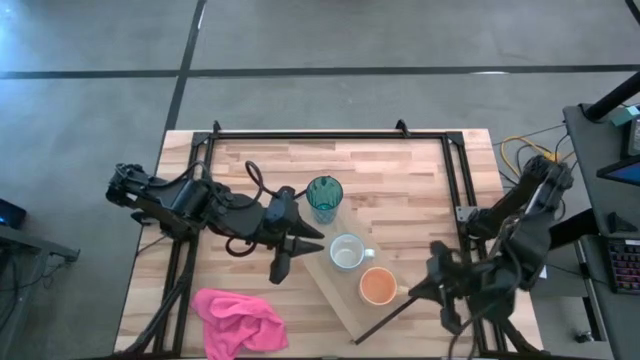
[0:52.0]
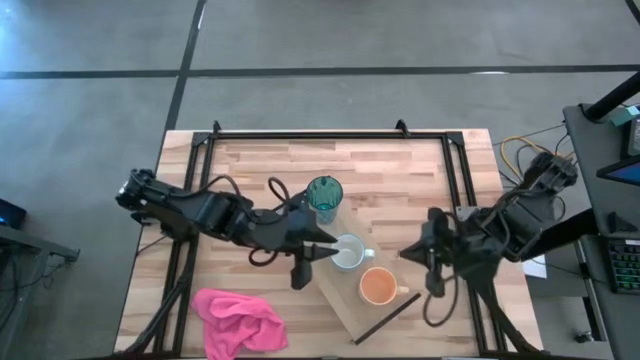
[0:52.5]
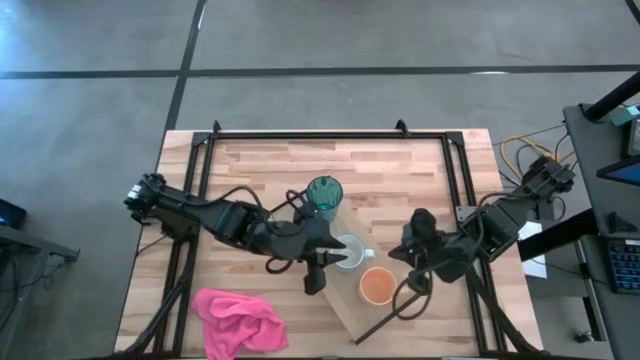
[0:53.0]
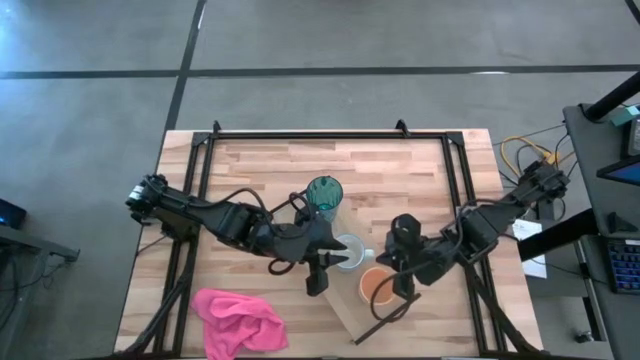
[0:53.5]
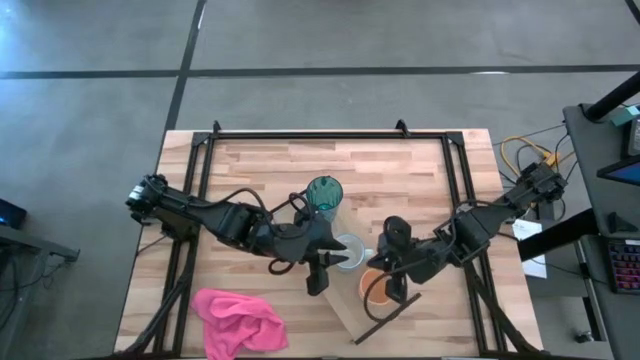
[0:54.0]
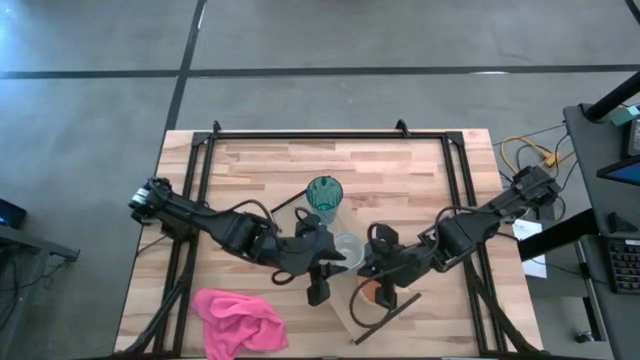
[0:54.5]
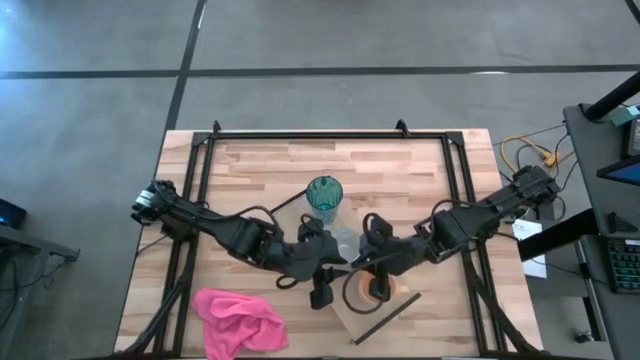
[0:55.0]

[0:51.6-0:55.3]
Task: Stack small to large cups/mugs on shelf
Adjust the white mug on the shelf

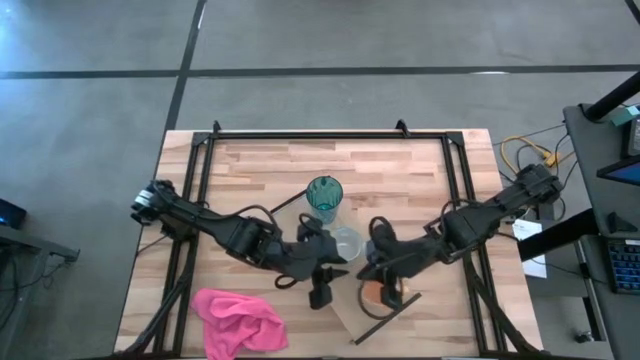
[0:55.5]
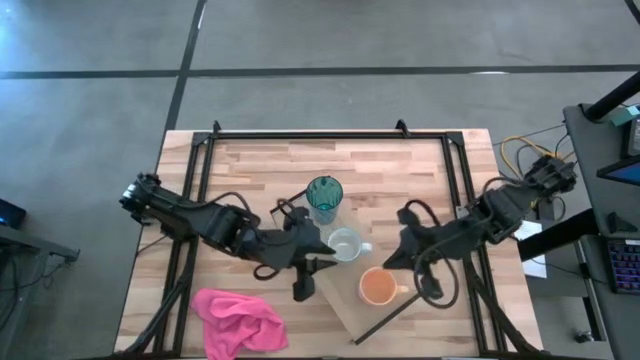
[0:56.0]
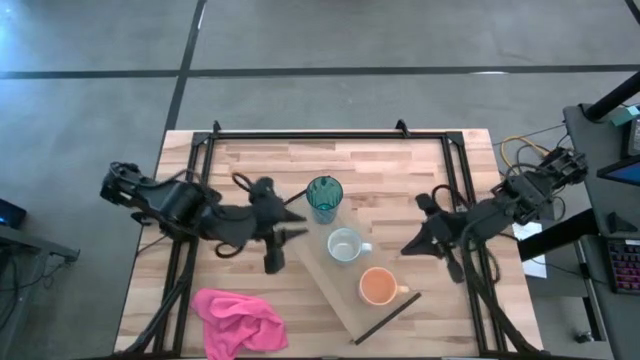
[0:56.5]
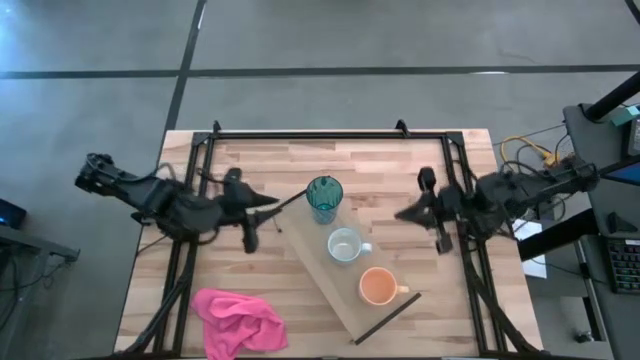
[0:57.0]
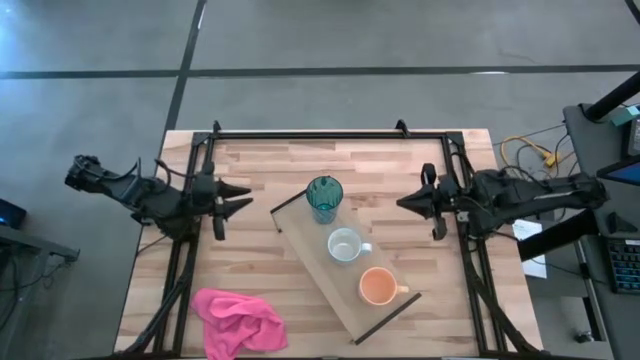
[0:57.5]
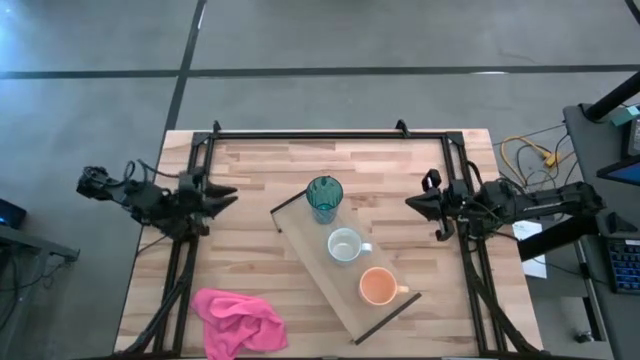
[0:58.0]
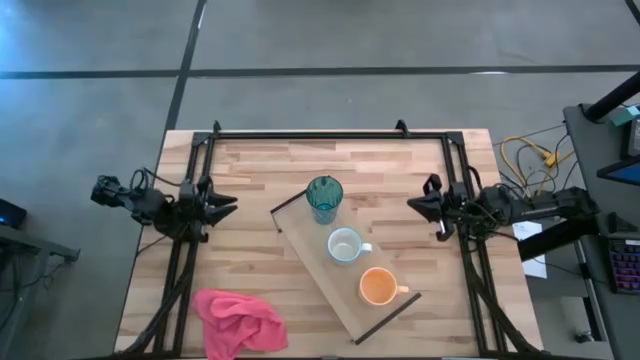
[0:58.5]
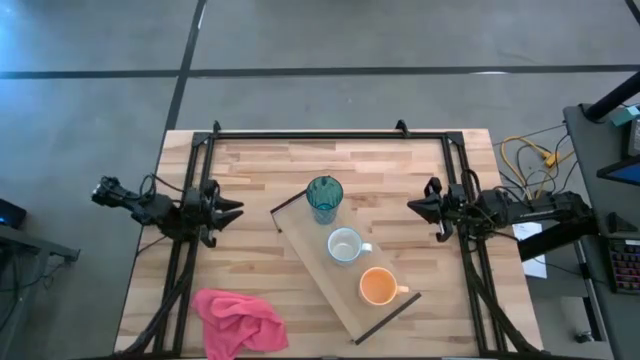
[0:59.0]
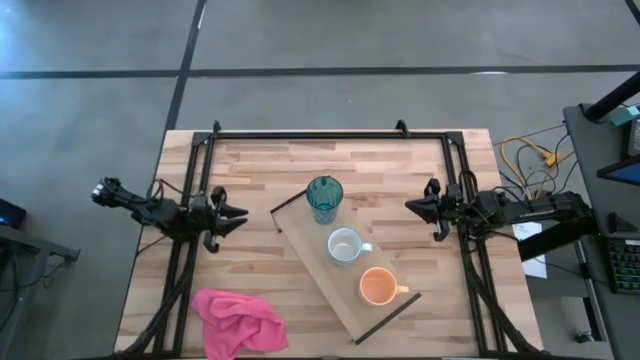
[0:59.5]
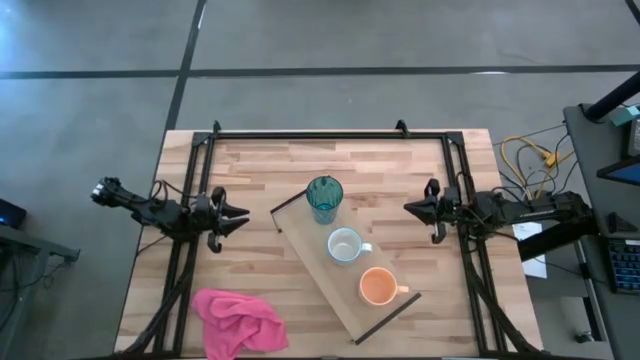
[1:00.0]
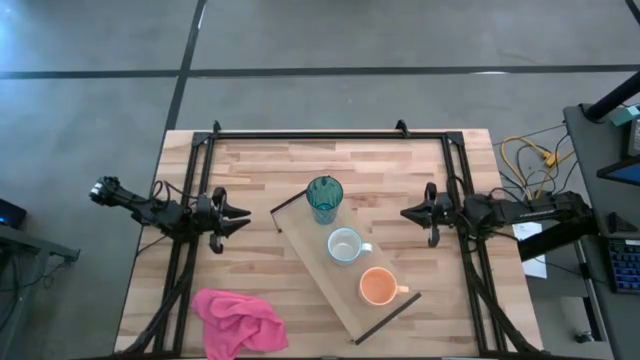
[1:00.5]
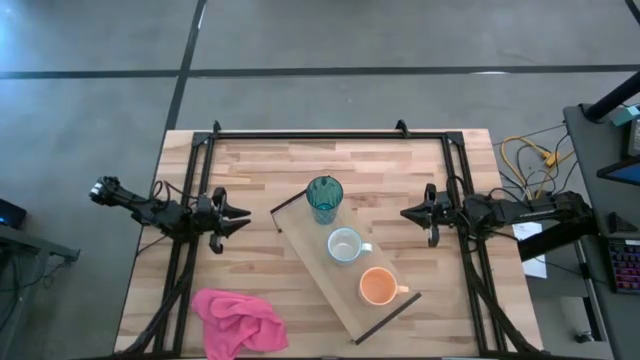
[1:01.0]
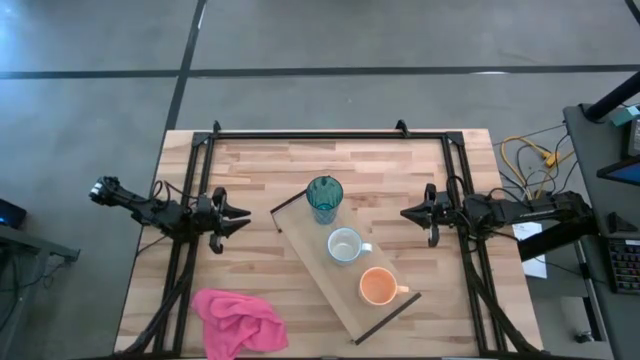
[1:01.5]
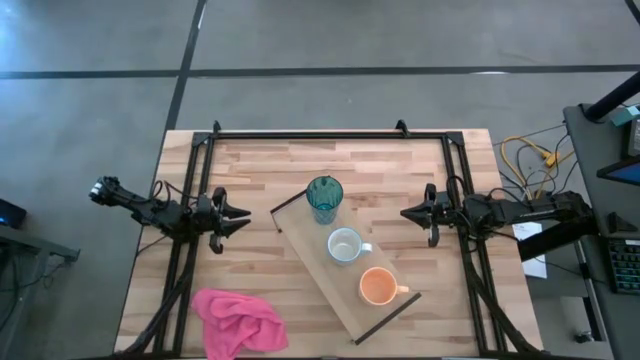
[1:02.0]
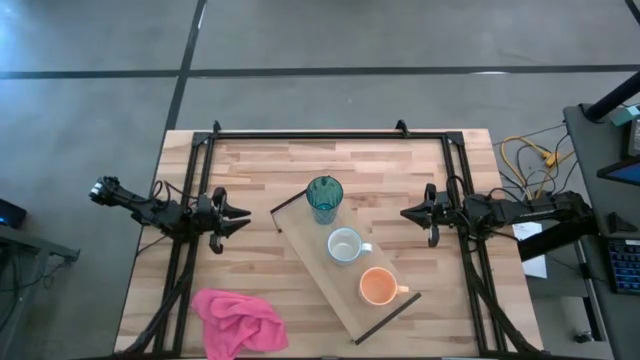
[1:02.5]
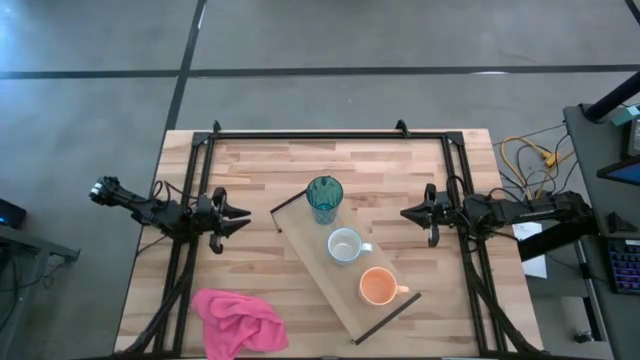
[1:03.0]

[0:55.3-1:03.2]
Return to Home Position

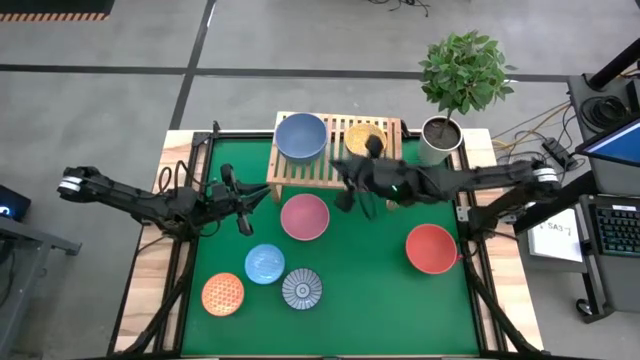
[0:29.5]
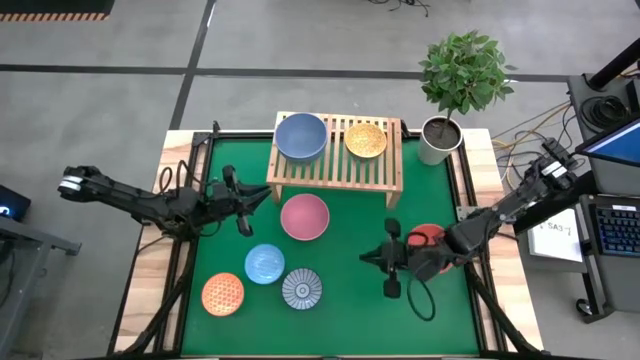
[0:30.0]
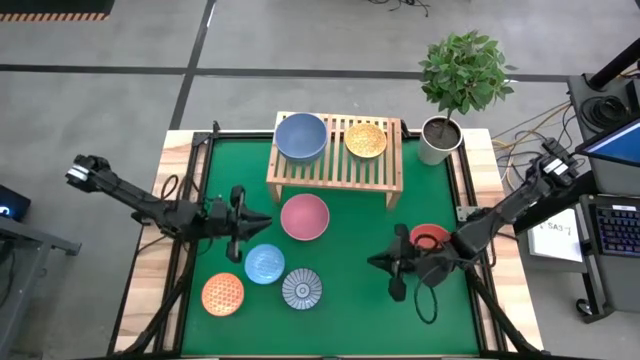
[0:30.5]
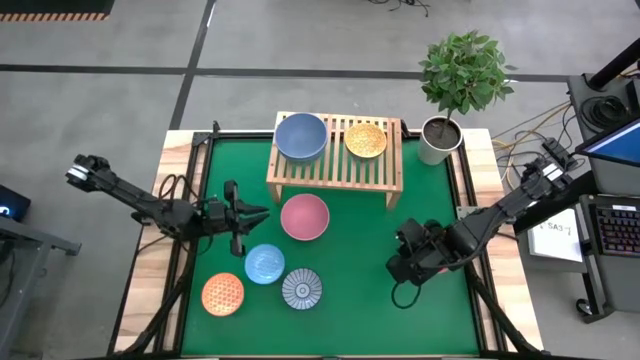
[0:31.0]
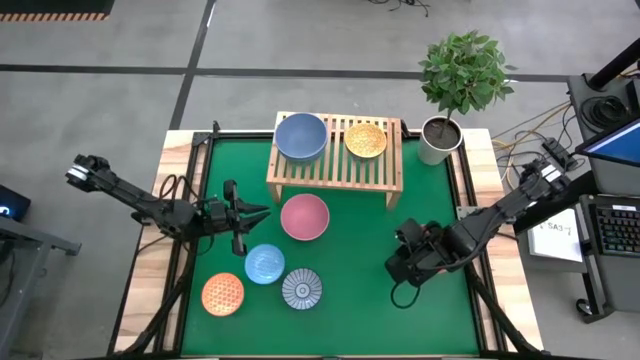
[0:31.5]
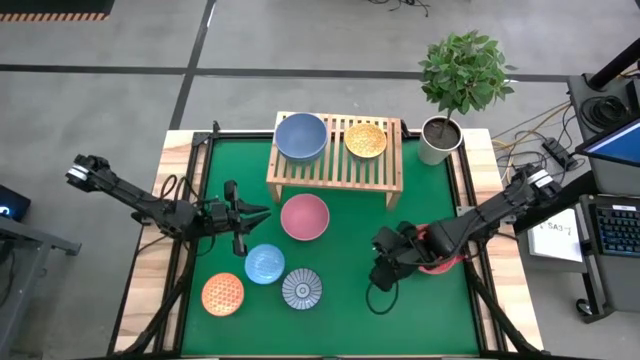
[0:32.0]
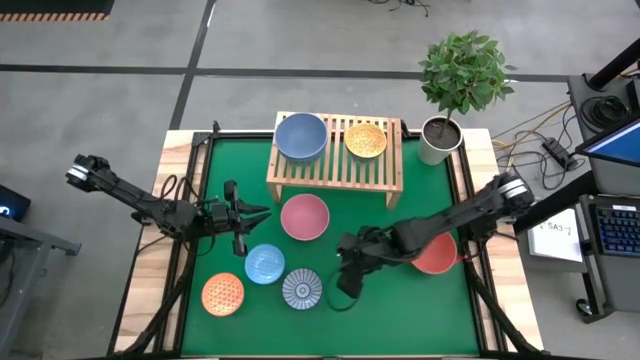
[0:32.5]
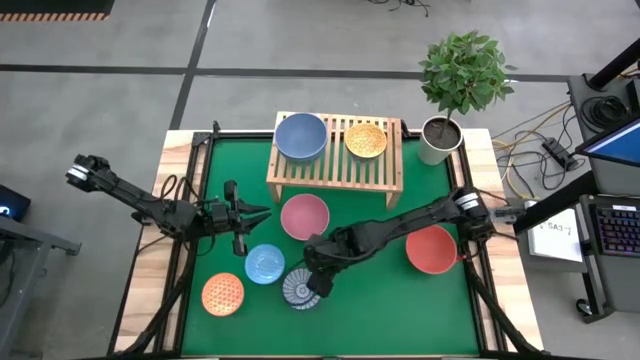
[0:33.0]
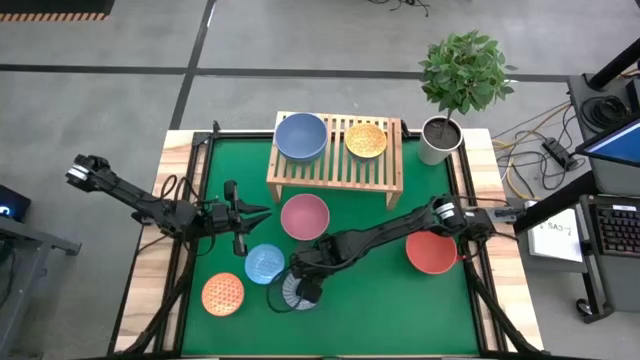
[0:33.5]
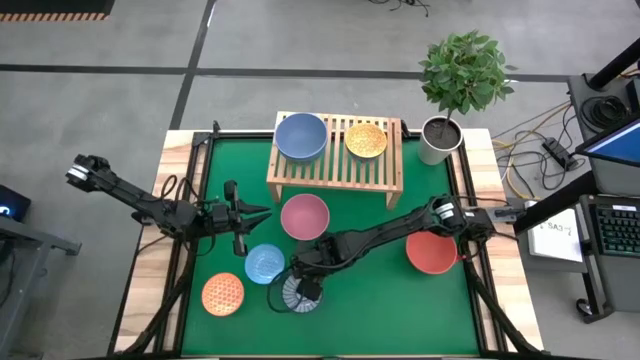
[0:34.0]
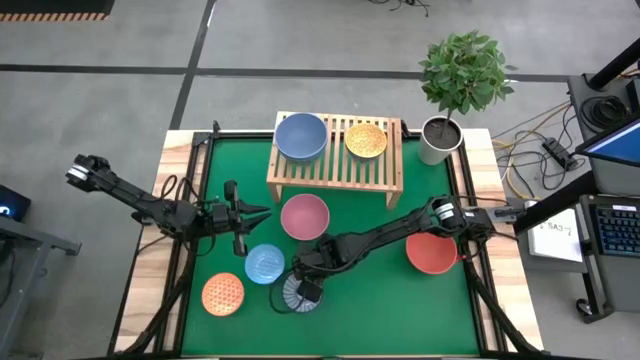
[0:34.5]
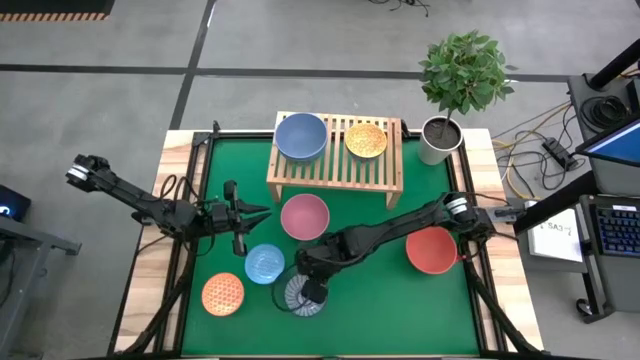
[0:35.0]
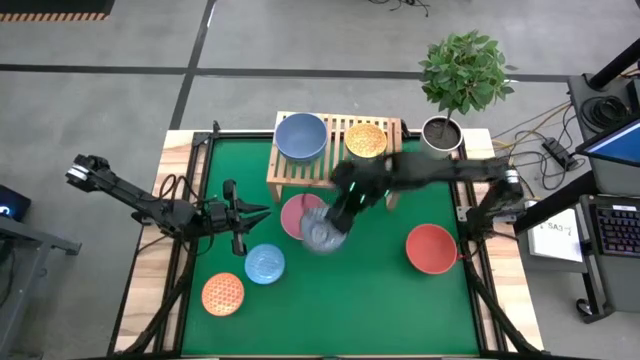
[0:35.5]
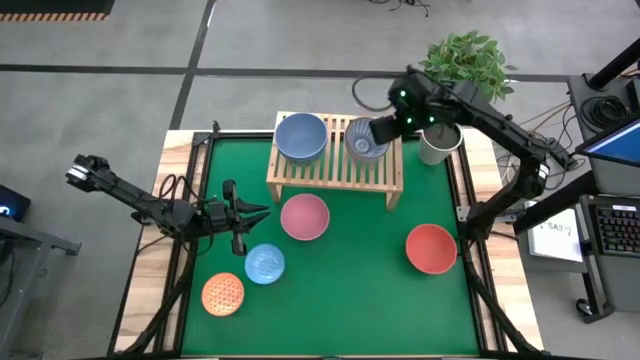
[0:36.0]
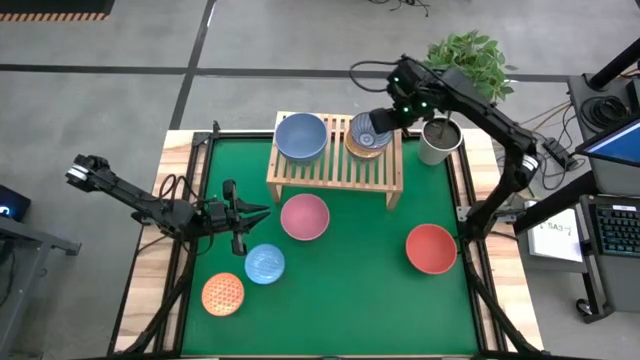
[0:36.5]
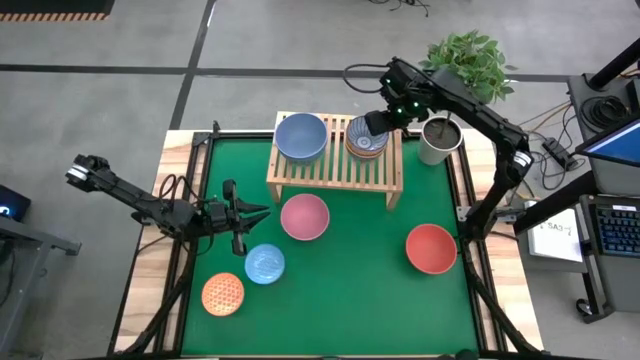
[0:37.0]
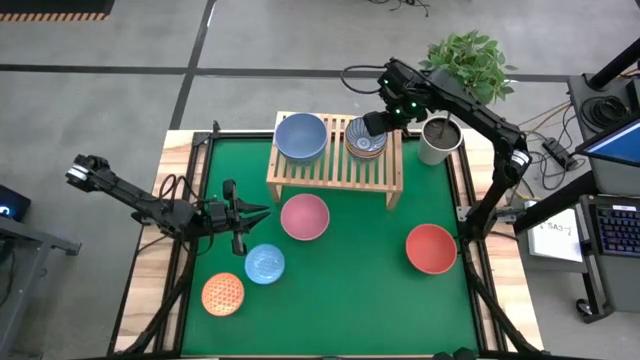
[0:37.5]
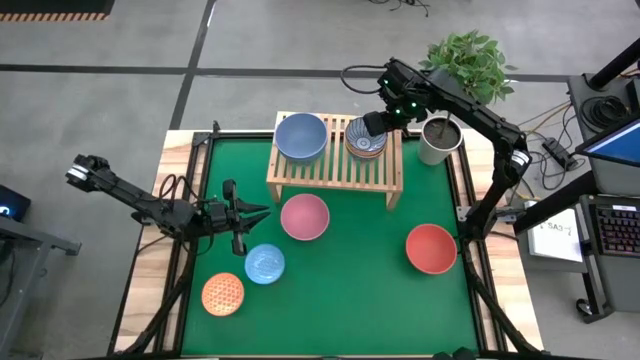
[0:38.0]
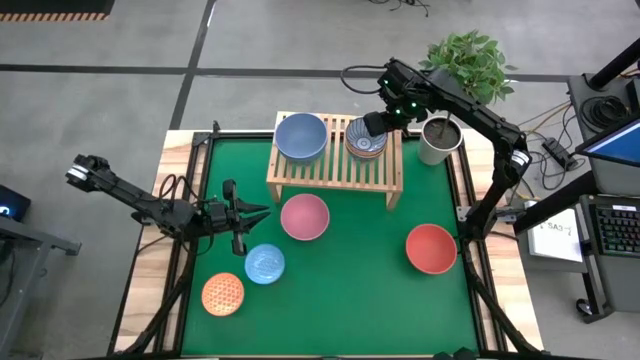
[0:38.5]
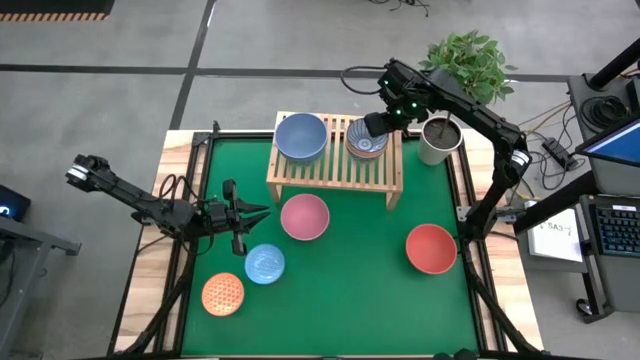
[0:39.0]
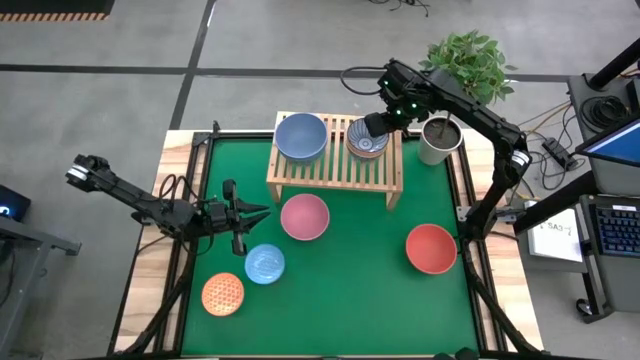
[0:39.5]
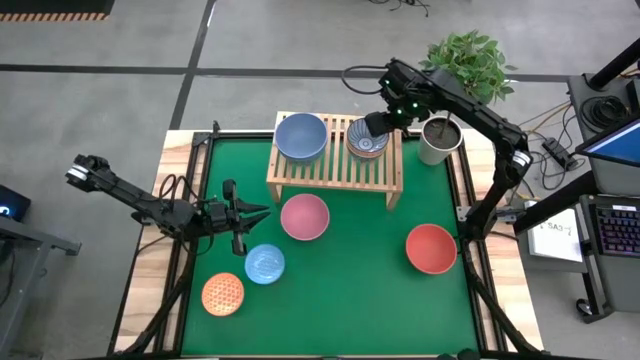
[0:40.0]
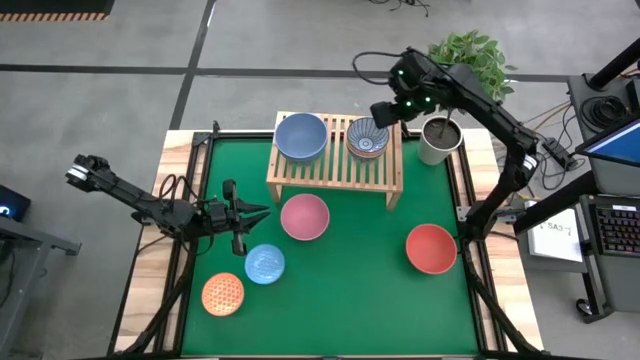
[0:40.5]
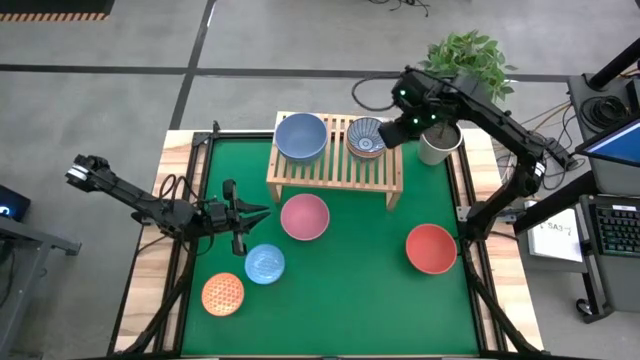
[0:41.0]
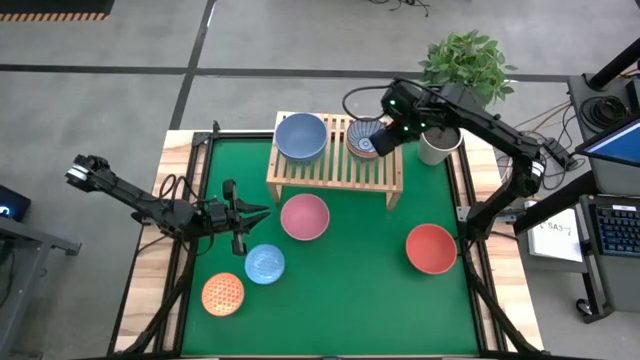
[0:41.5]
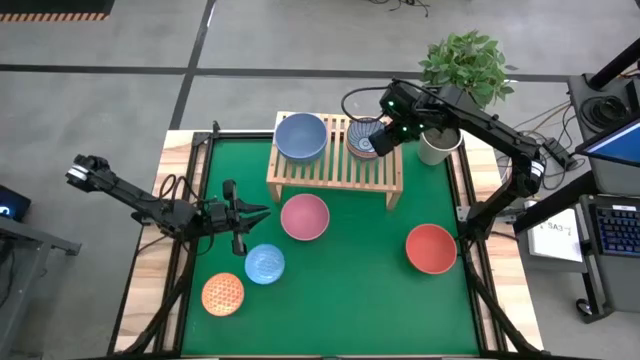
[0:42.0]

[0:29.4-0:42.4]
Task: Place and stack bowls onto a shelf
Stack the blue patterned bowl on top of the yellow patterned bowl on the shelf
